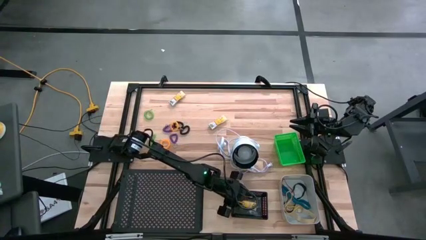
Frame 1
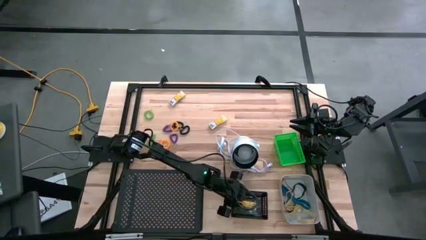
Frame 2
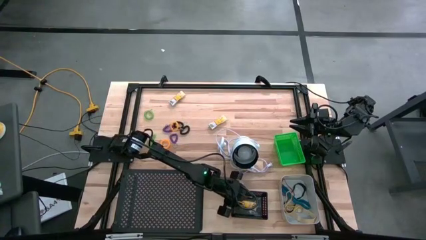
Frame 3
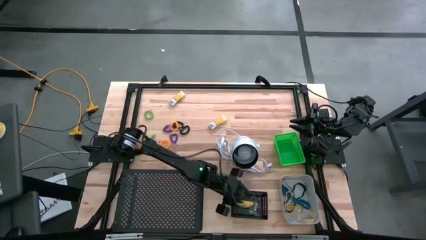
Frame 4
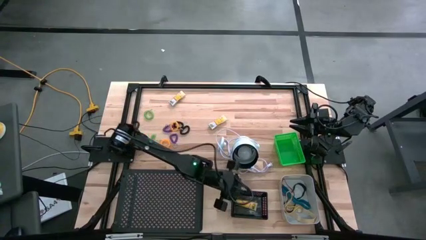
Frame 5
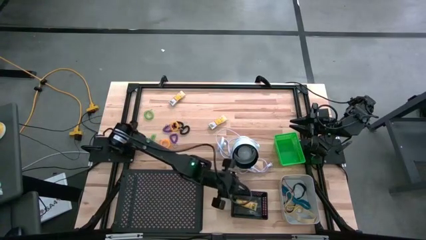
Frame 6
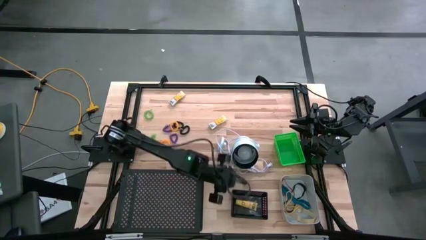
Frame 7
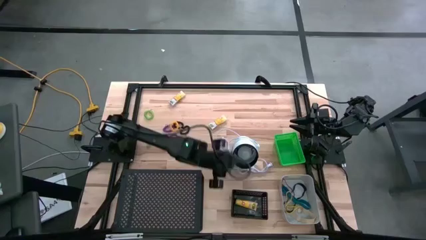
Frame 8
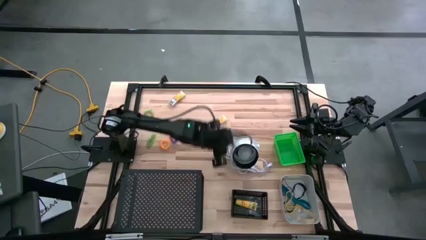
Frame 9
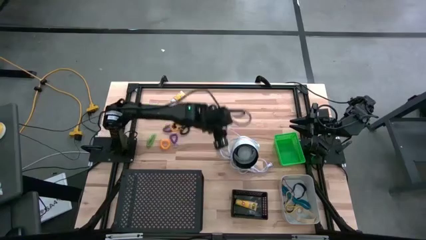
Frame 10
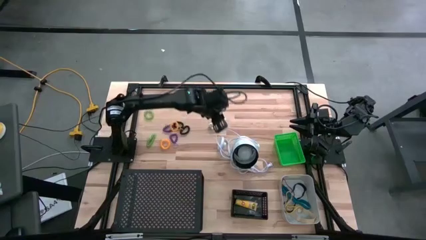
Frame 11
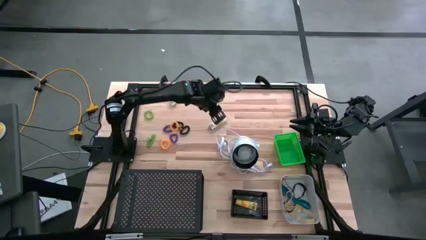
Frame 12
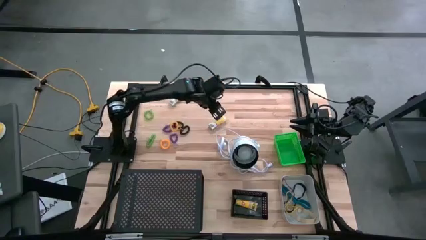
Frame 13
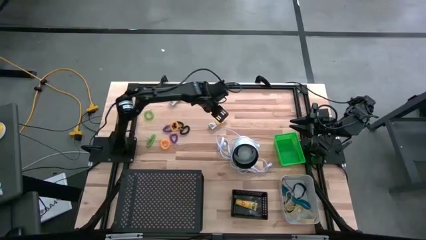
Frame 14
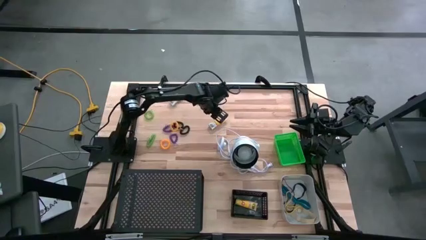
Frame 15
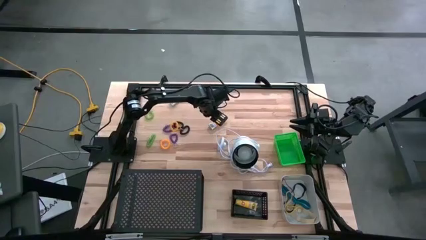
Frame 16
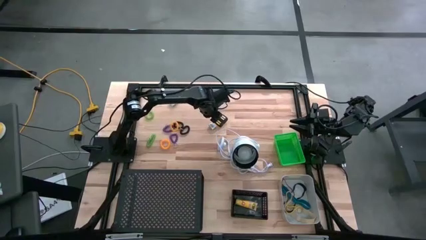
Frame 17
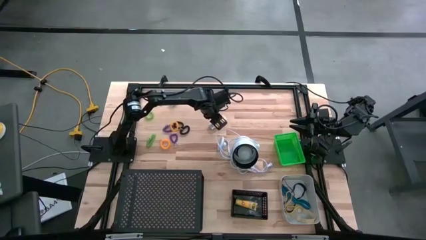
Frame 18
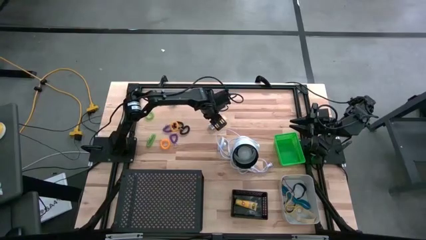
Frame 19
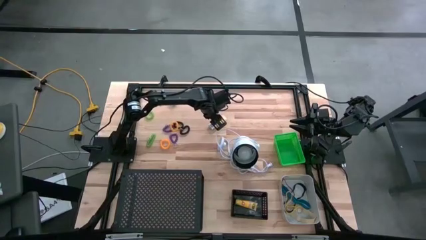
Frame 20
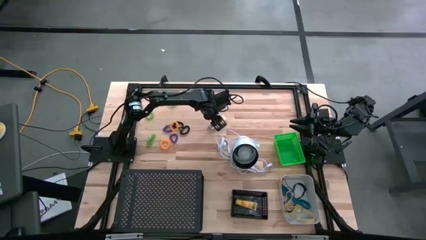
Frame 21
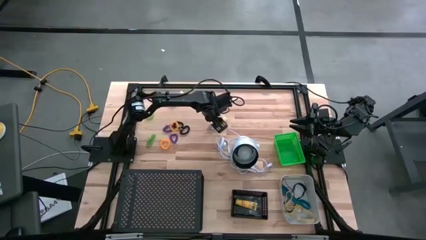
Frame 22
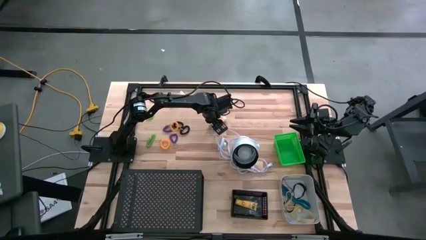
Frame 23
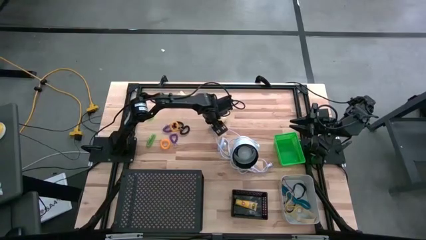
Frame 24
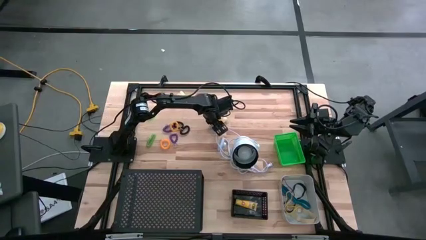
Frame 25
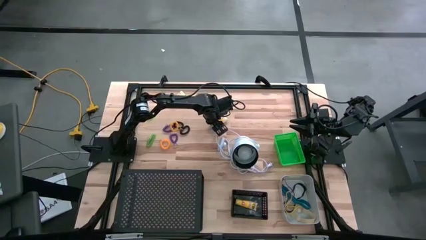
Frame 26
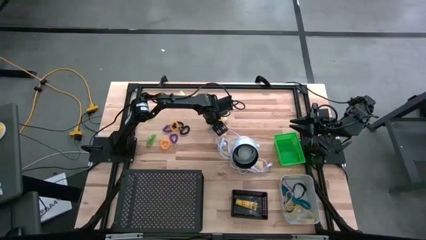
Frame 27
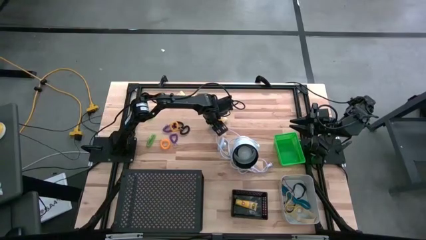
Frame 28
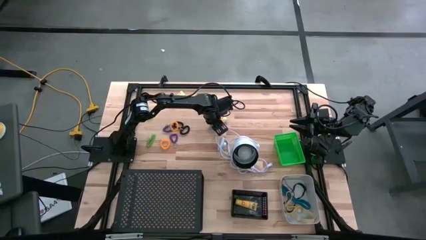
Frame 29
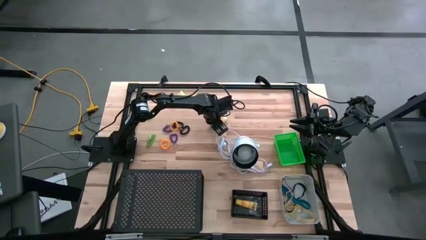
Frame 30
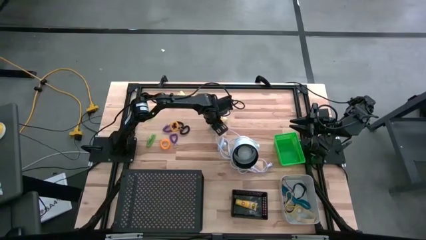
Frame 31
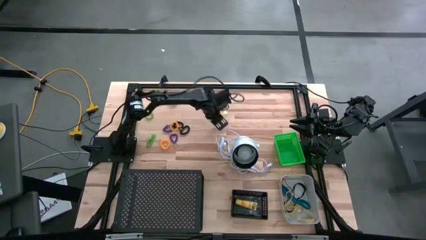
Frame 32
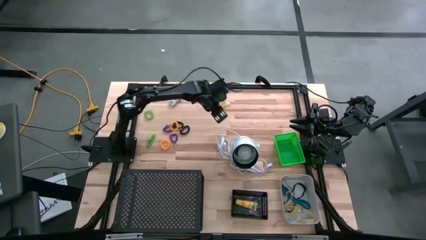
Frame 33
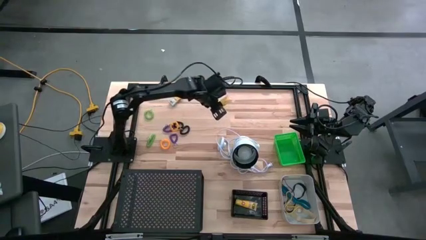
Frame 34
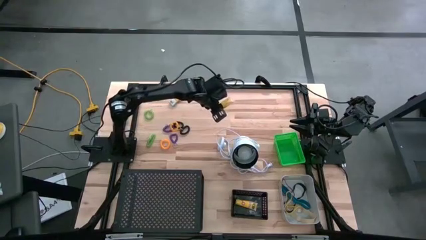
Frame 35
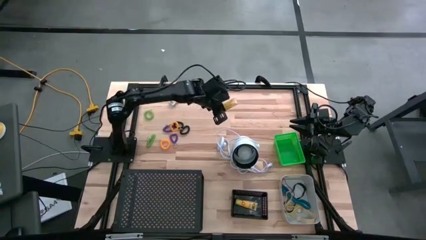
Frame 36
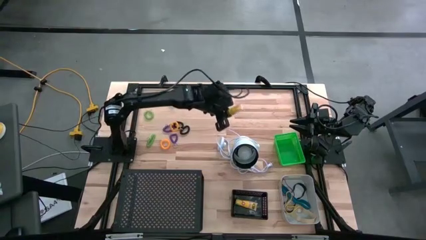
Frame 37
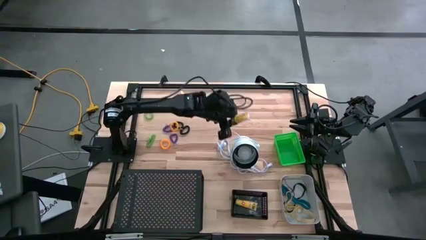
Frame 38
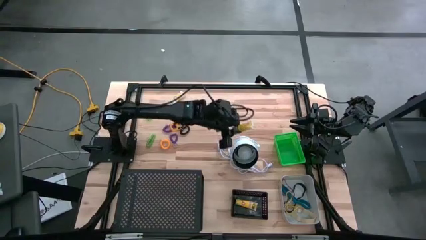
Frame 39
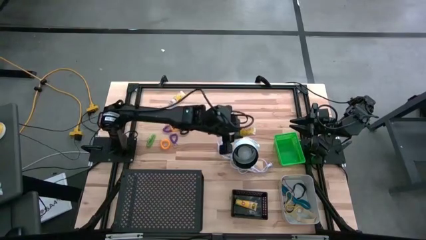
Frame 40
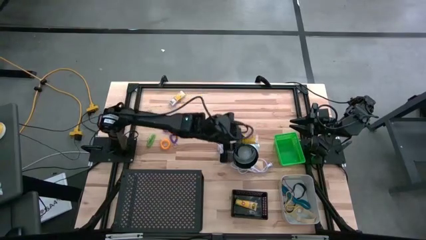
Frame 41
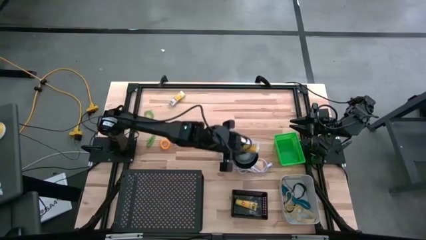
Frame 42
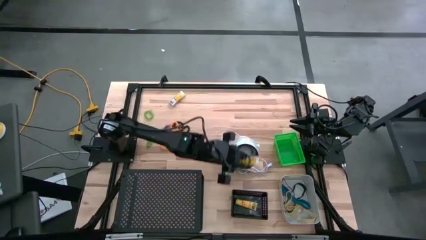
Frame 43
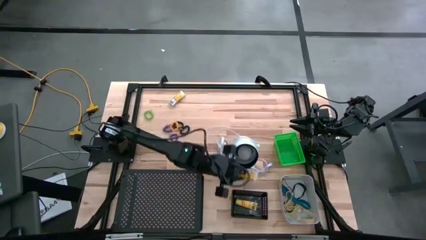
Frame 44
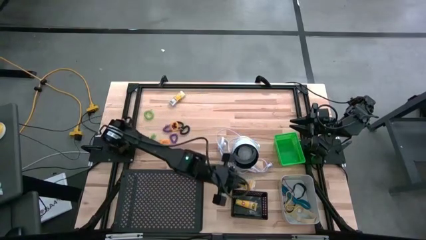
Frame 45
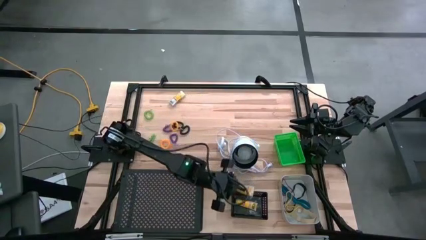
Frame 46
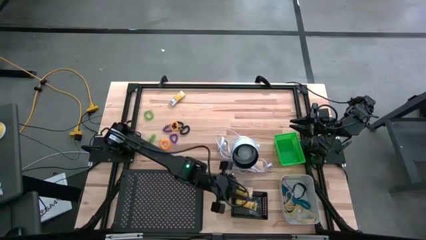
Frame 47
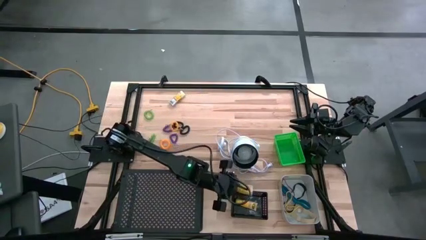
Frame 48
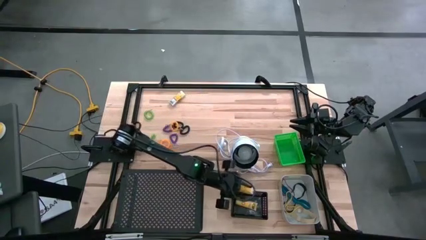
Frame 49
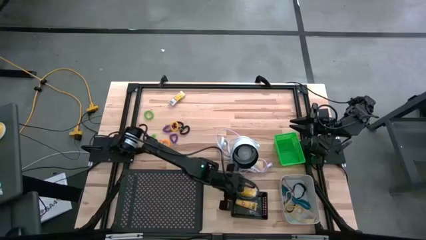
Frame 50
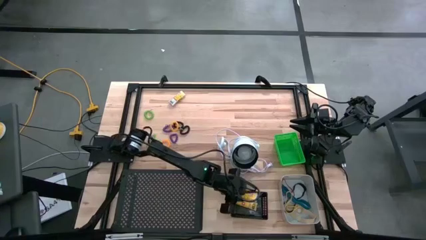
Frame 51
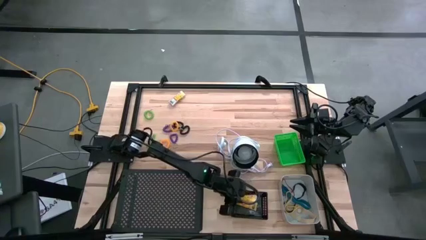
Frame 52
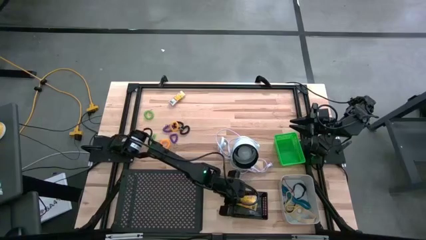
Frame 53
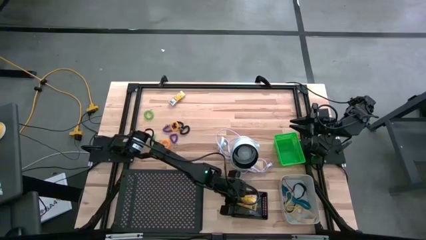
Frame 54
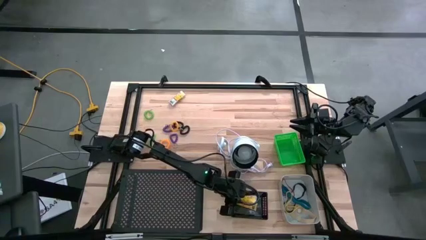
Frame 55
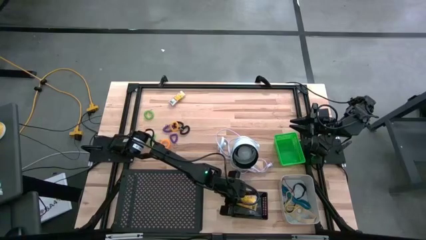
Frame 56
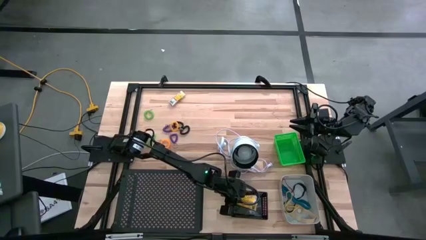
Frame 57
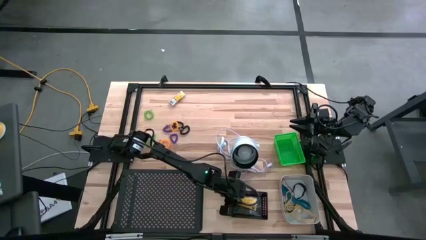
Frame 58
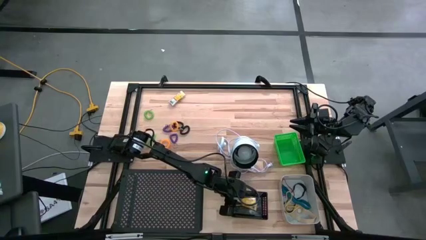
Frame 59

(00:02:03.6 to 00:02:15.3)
Task: Pick & Place Office Desk Supplies
Put the bottom yellow crayon box into the black bin

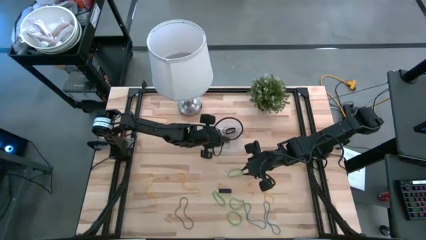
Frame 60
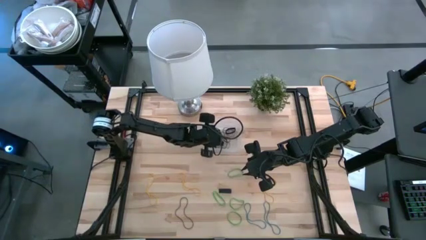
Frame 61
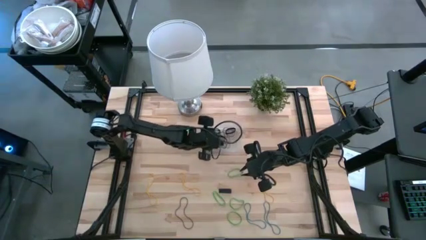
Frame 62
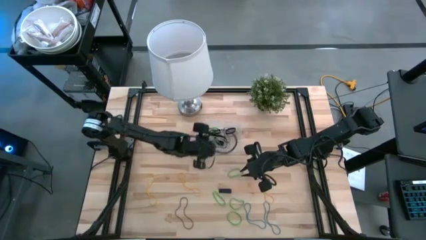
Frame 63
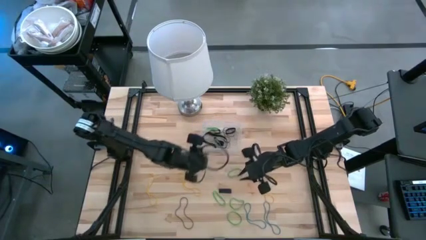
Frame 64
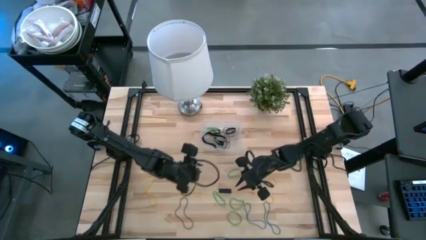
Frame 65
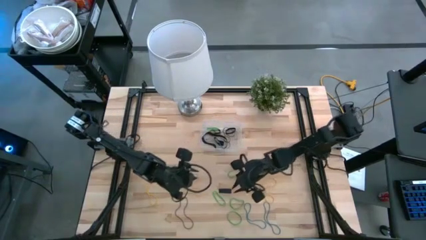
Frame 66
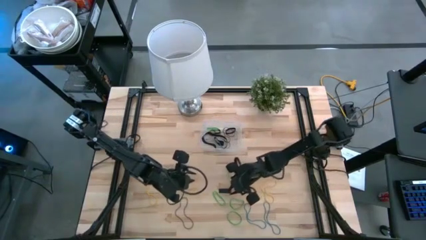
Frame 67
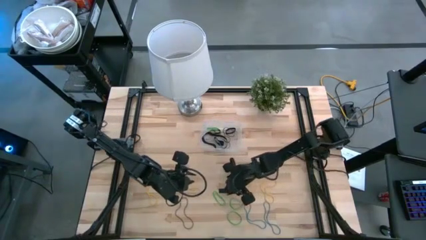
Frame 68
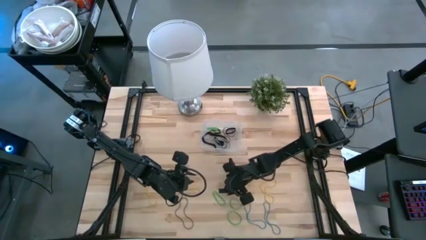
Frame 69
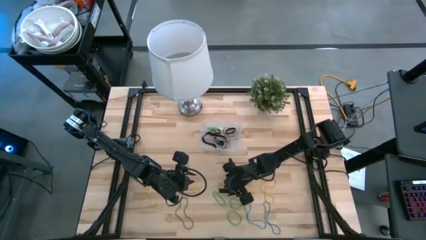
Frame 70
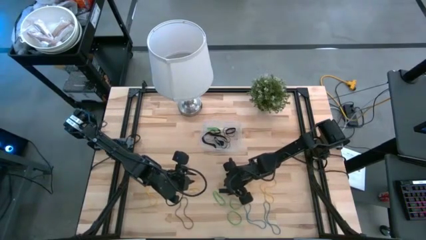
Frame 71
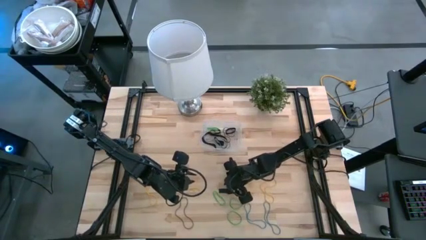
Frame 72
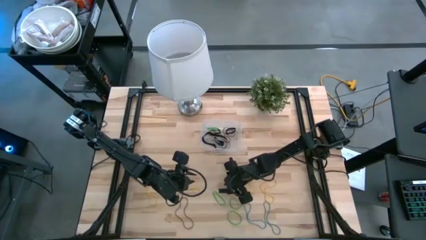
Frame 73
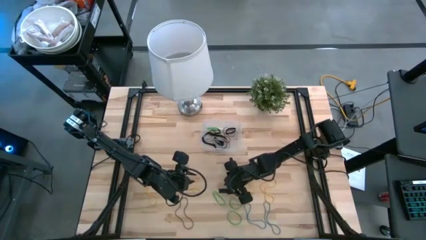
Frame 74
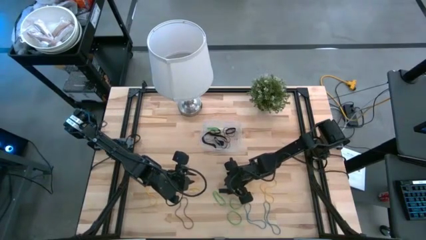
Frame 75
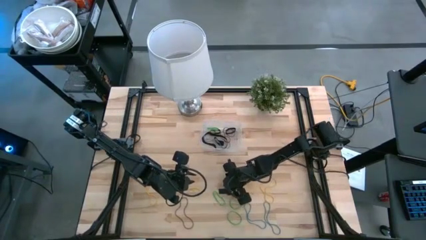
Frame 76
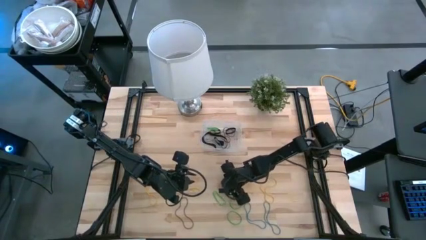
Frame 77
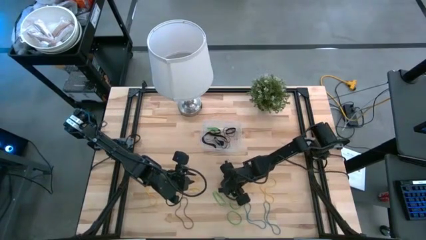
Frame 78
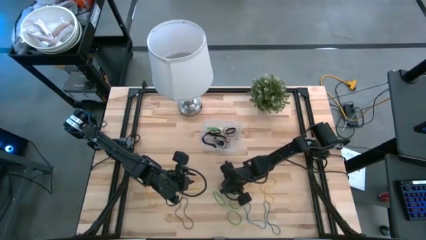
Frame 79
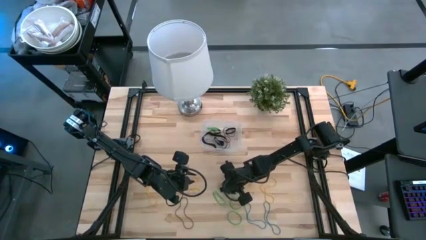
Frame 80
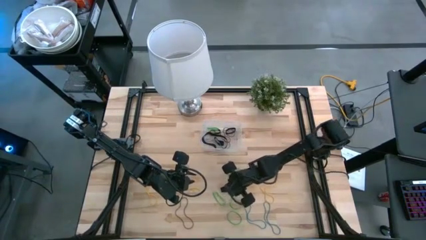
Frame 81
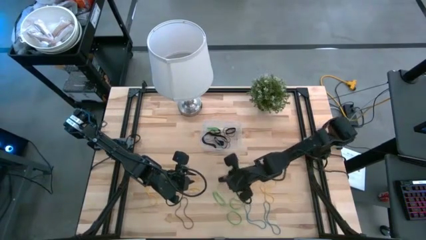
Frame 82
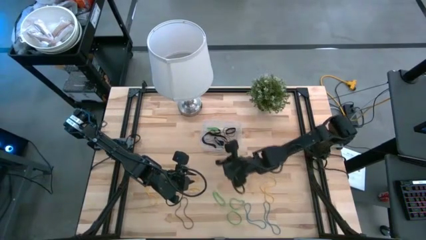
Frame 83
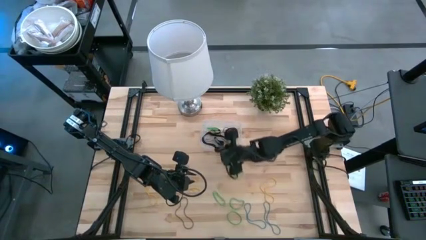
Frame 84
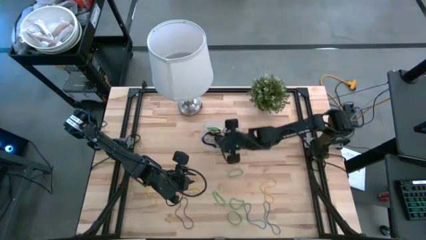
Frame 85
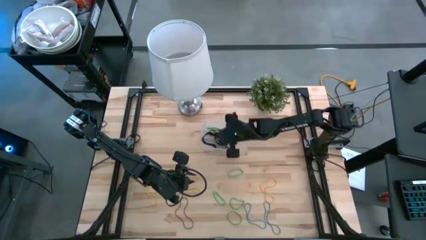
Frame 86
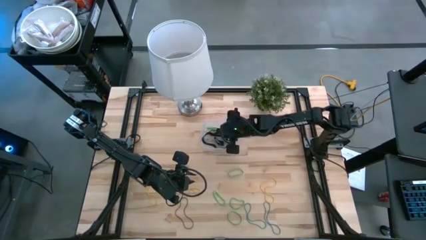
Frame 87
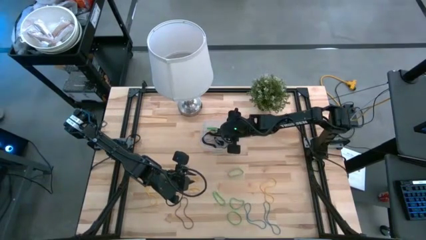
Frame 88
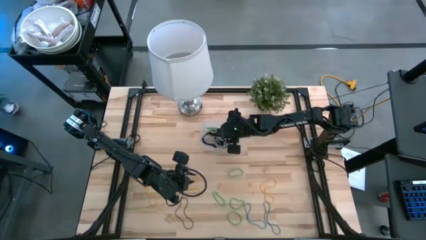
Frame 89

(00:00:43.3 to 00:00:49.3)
Task: Pick and place rubber bands into bin
Put the black rubber band into the transparent bin
